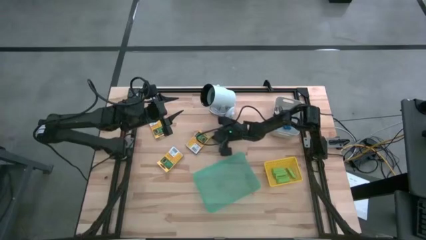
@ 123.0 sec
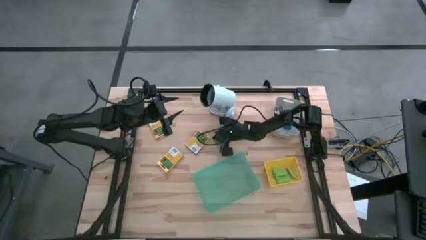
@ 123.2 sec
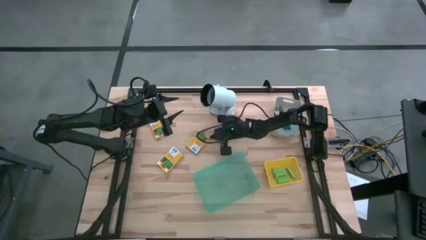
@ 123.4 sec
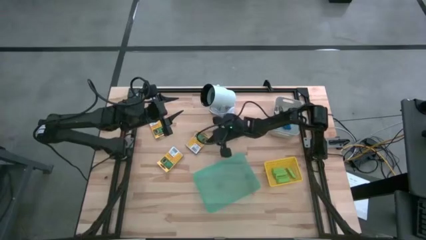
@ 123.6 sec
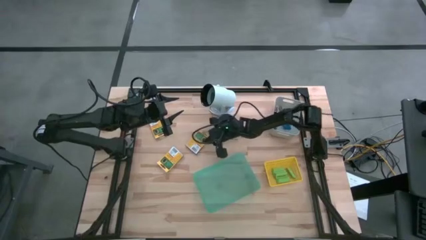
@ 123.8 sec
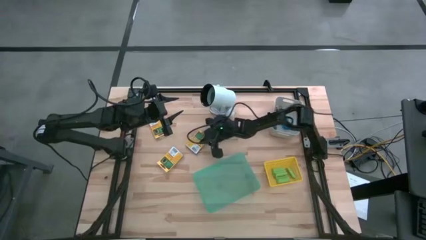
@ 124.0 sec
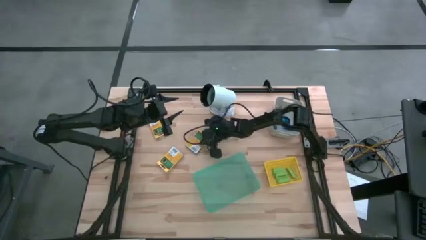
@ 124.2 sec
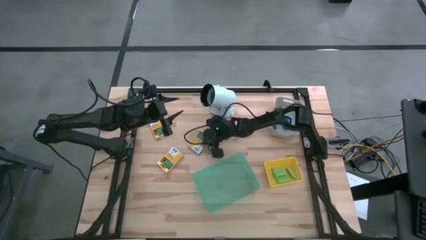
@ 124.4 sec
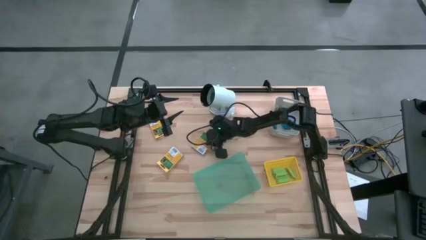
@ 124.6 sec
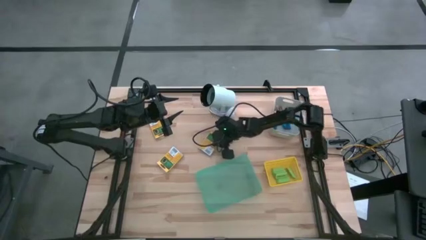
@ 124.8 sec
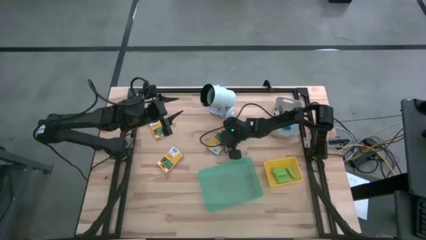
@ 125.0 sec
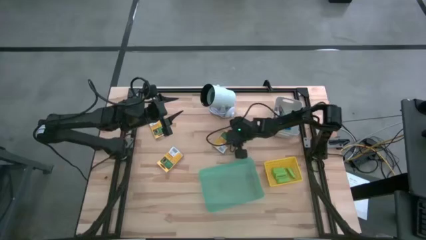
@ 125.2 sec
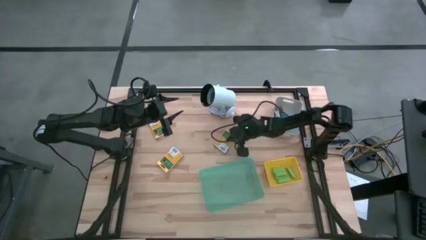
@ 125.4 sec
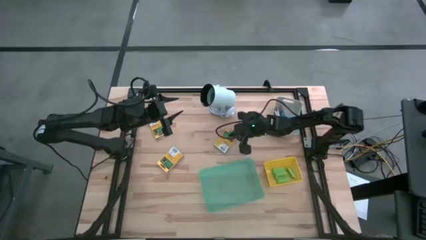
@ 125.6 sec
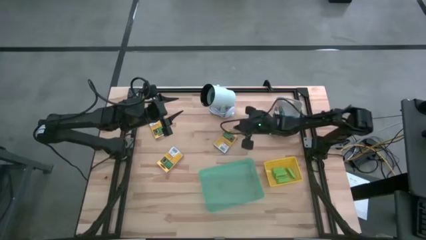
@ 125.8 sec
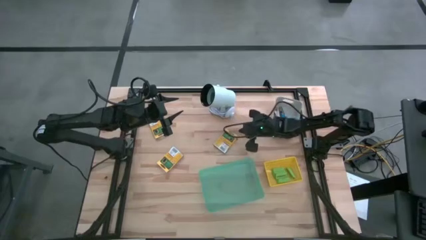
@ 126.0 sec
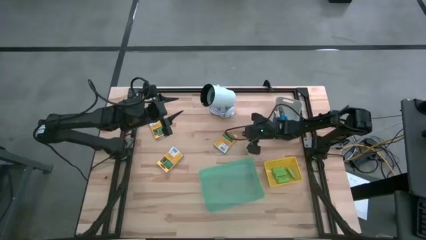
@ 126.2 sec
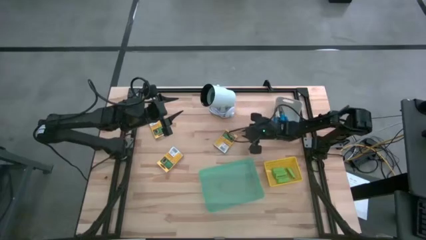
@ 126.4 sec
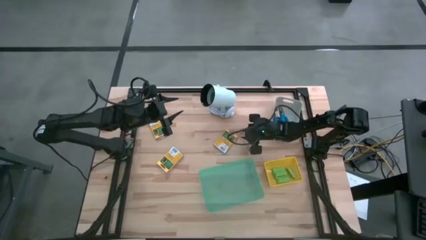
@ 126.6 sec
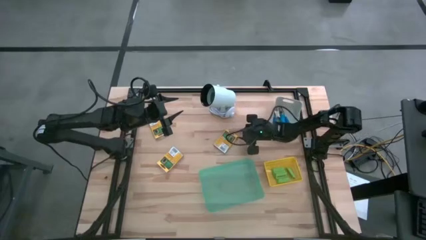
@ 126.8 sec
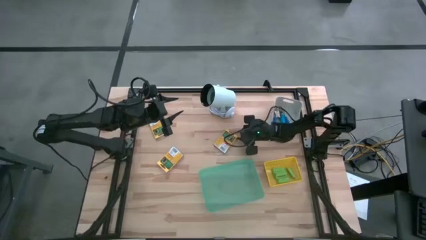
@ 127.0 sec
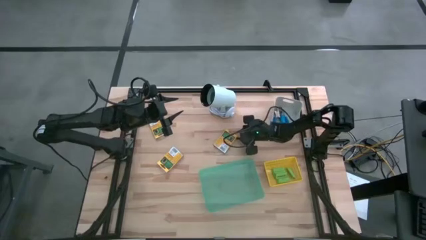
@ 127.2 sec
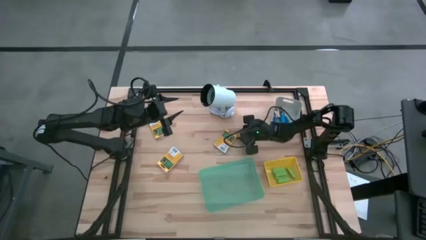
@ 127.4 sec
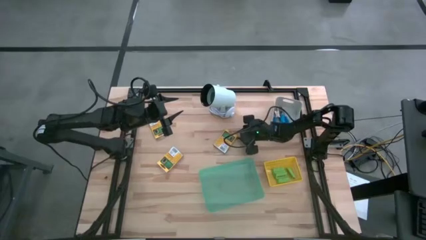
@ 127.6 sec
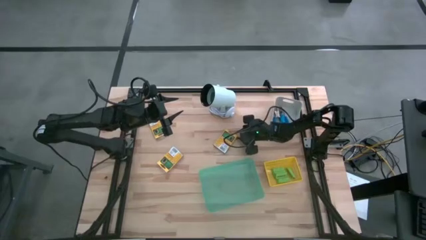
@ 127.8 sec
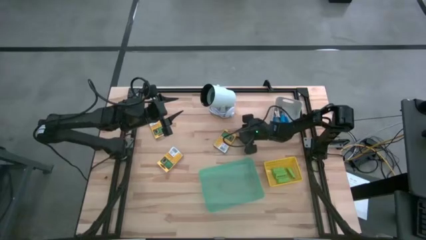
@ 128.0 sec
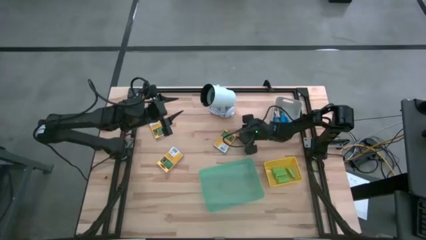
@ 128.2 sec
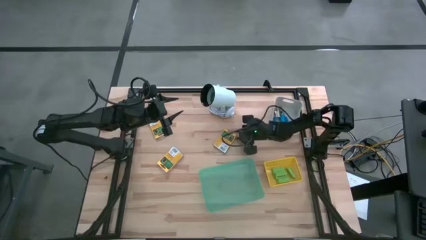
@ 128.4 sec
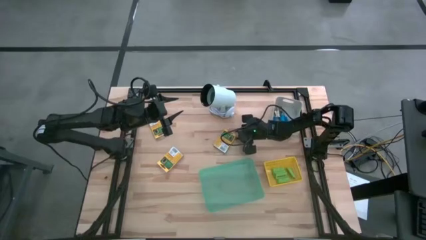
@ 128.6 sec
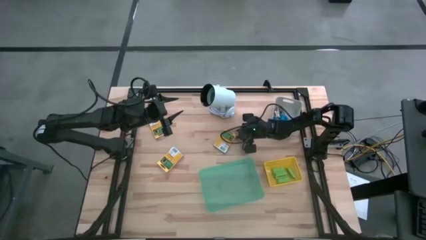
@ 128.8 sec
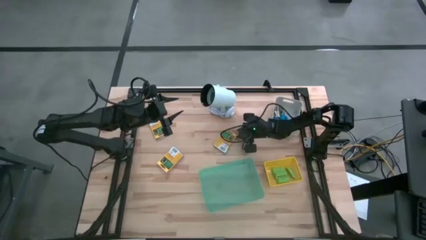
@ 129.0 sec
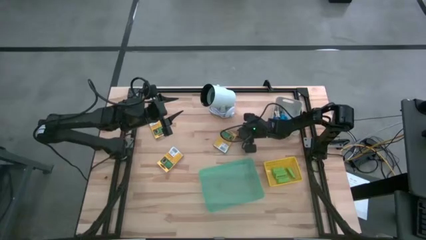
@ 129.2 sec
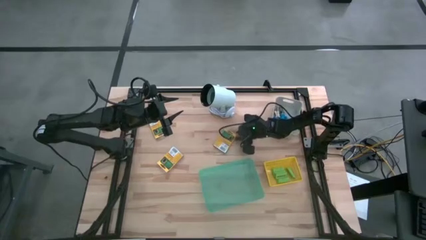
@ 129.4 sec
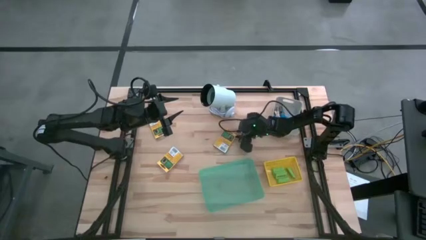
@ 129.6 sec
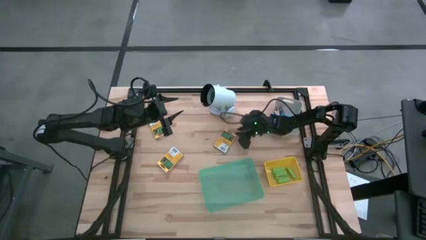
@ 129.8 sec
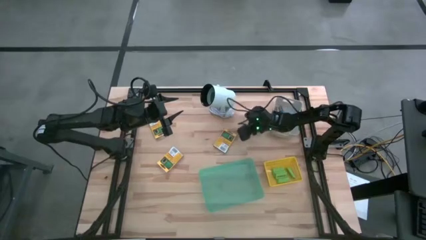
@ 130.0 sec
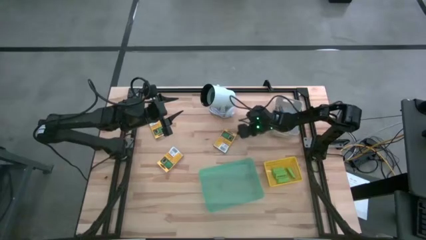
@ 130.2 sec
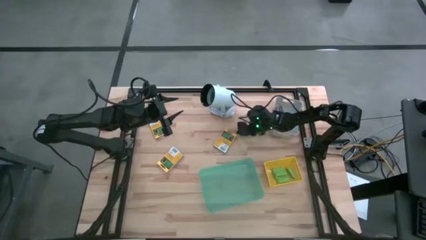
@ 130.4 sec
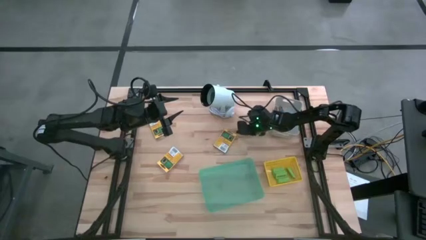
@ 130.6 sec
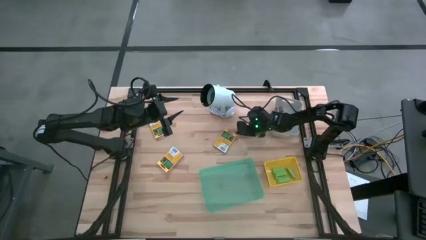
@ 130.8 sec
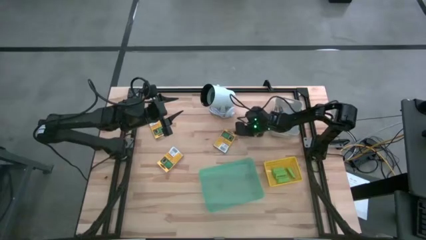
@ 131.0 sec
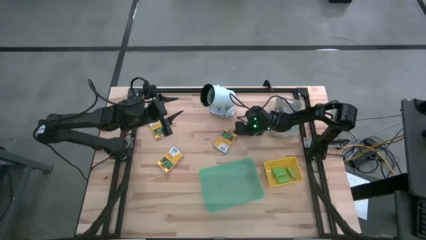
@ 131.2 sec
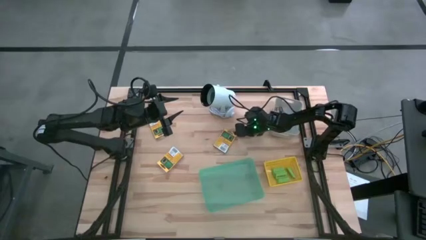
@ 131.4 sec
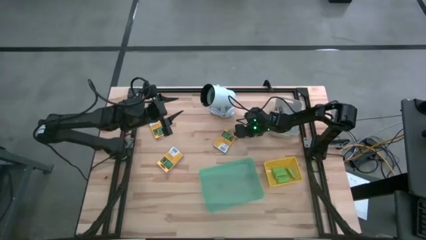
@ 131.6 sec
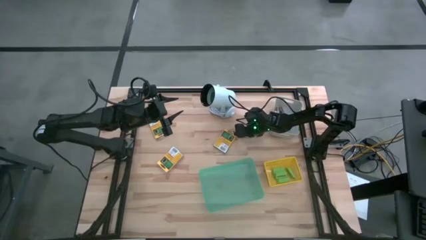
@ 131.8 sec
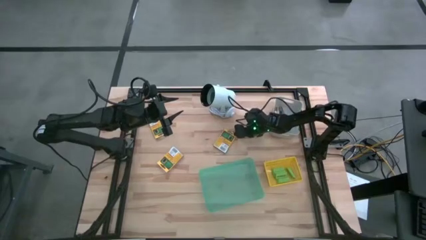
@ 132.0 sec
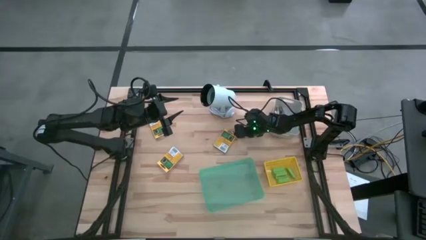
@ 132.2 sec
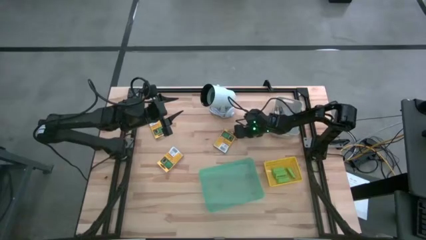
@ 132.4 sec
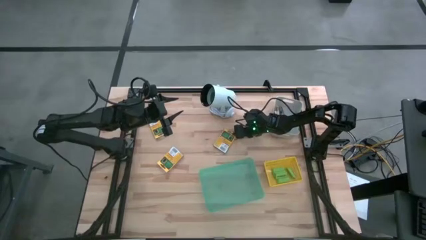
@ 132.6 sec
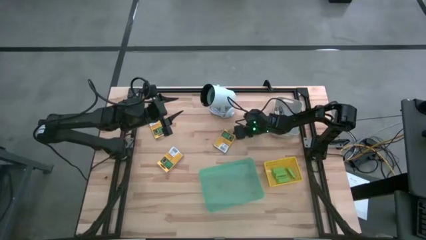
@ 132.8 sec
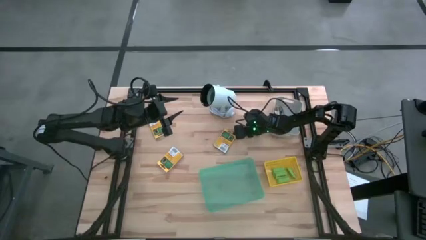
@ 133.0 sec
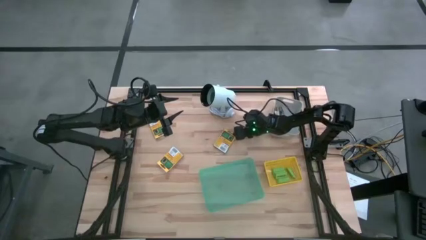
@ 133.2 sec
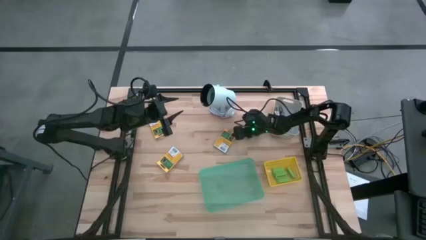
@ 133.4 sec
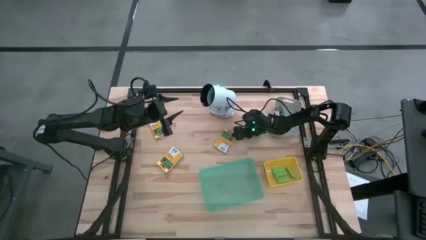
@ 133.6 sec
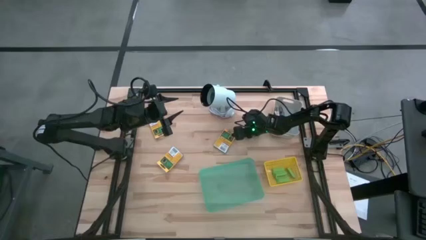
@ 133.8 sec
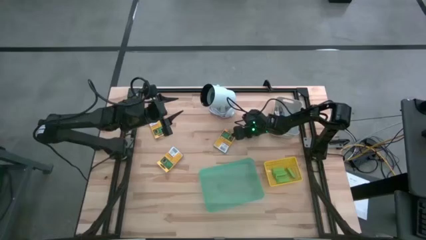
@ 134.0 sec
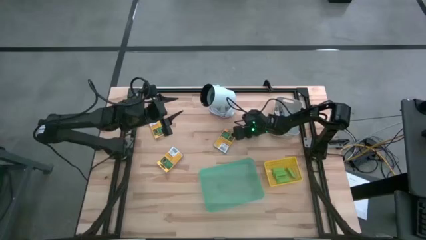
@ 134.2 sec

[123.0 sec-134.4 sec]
Task: Pick & Place School Supplies
Put the yellow crayon box into the green bin
